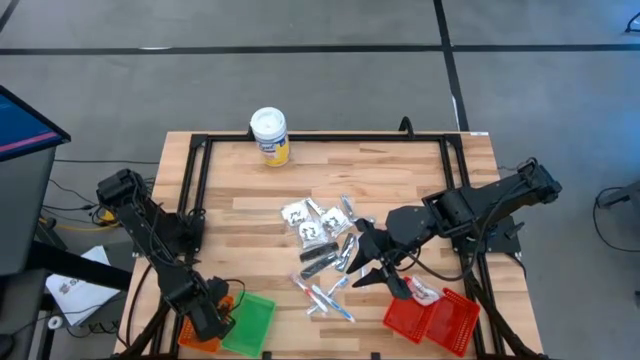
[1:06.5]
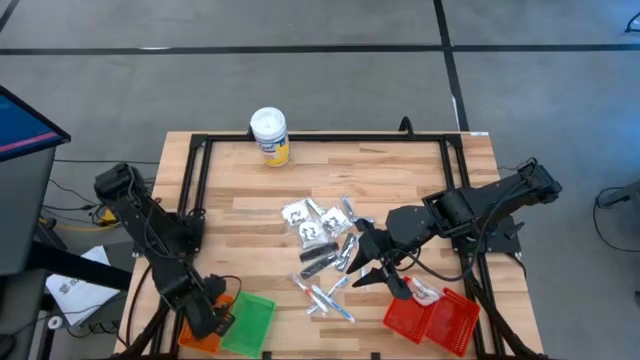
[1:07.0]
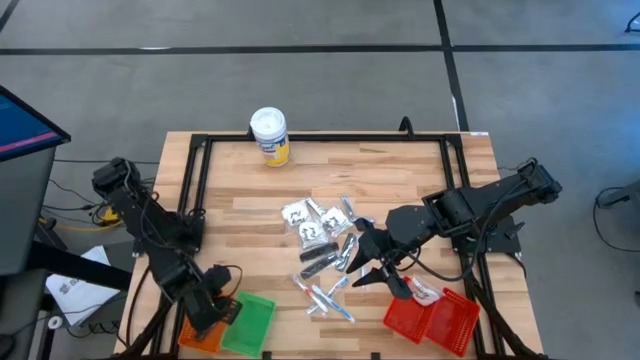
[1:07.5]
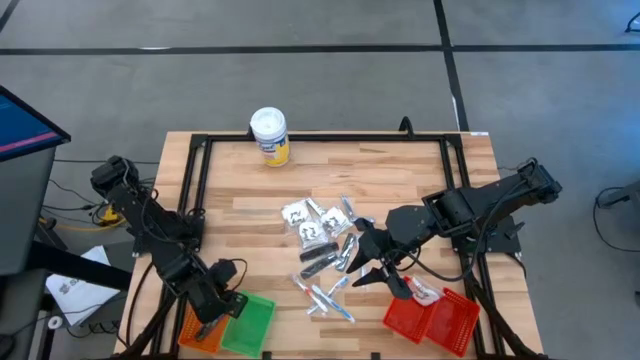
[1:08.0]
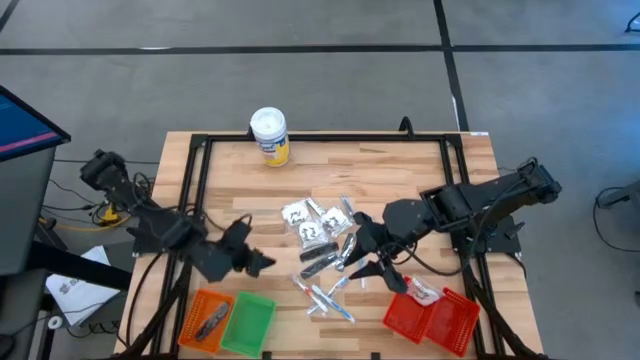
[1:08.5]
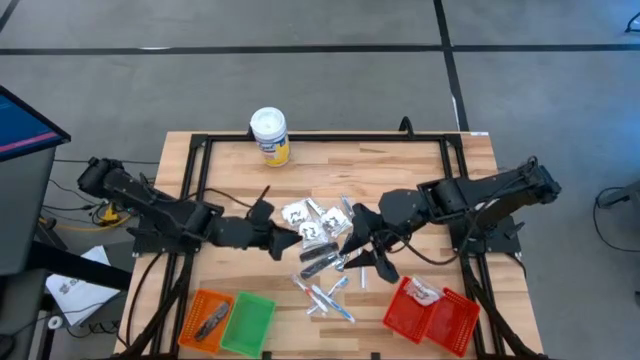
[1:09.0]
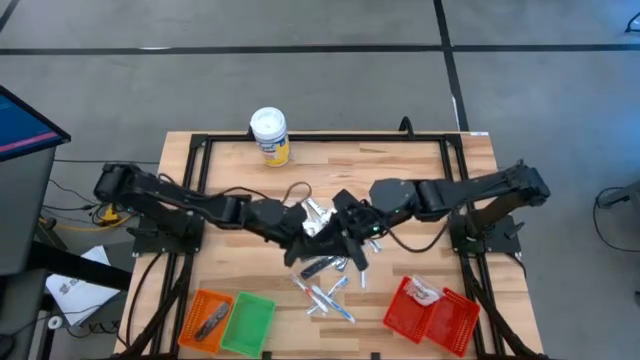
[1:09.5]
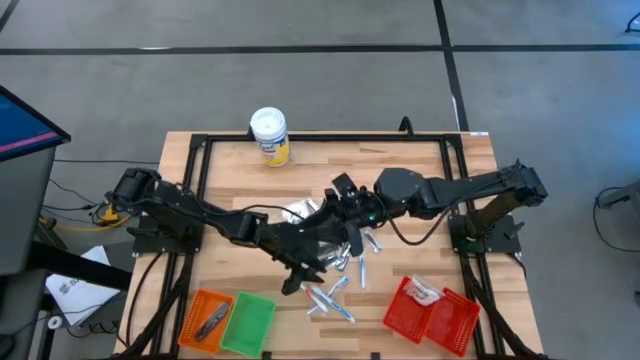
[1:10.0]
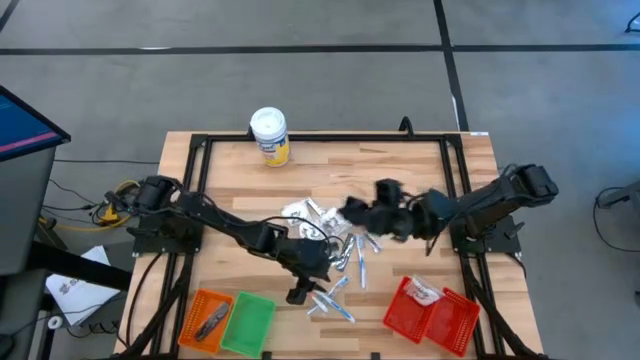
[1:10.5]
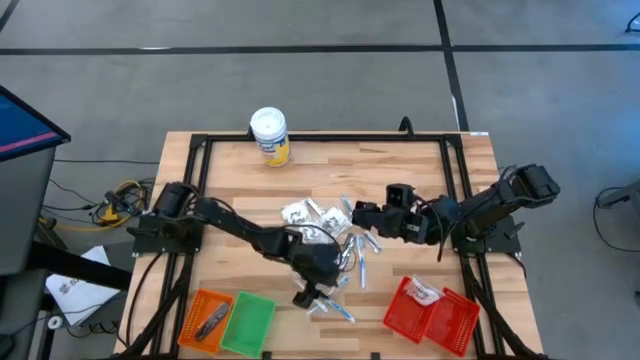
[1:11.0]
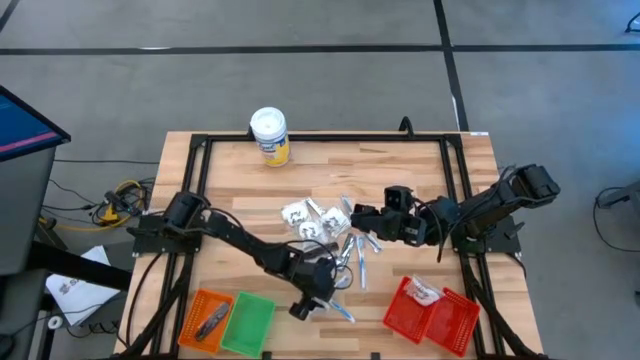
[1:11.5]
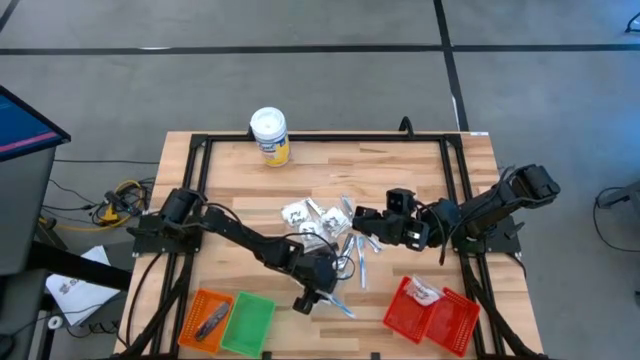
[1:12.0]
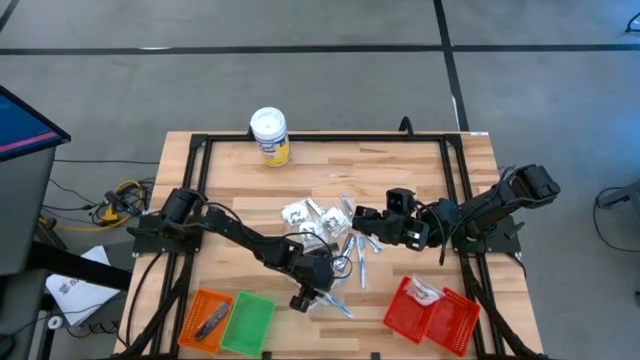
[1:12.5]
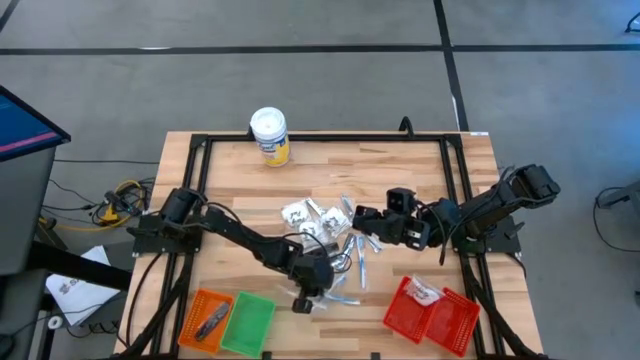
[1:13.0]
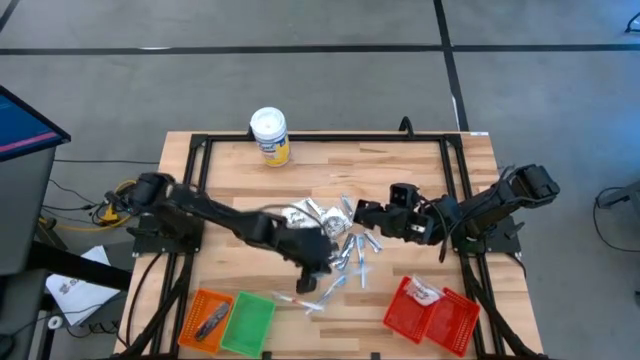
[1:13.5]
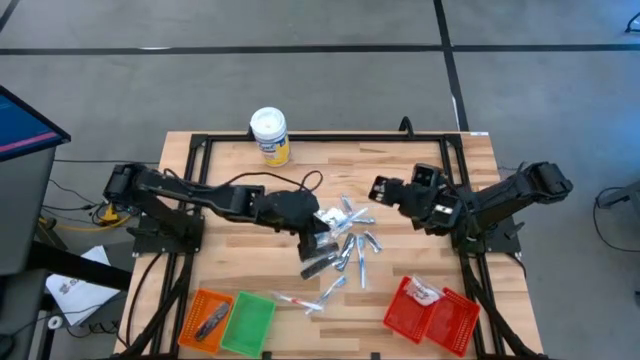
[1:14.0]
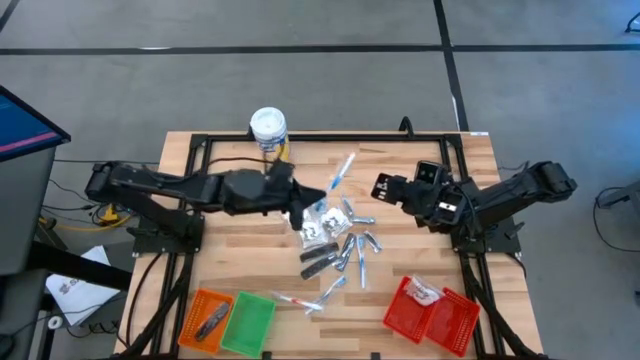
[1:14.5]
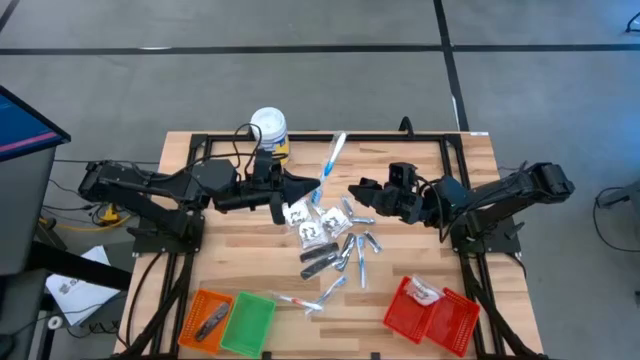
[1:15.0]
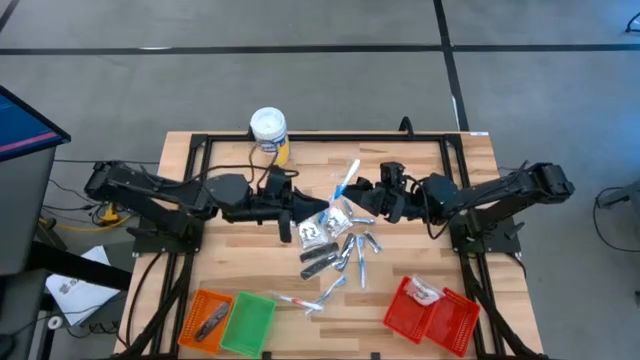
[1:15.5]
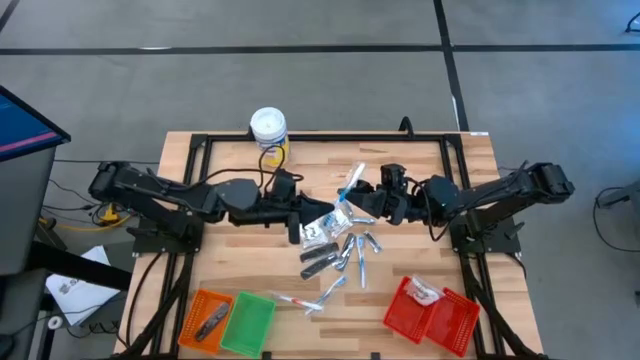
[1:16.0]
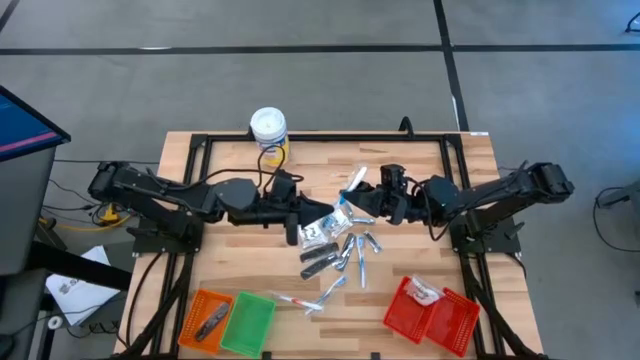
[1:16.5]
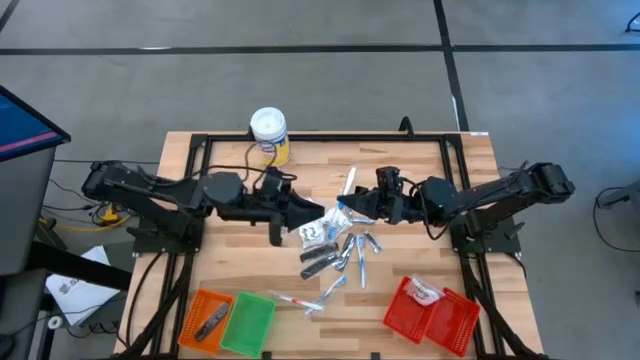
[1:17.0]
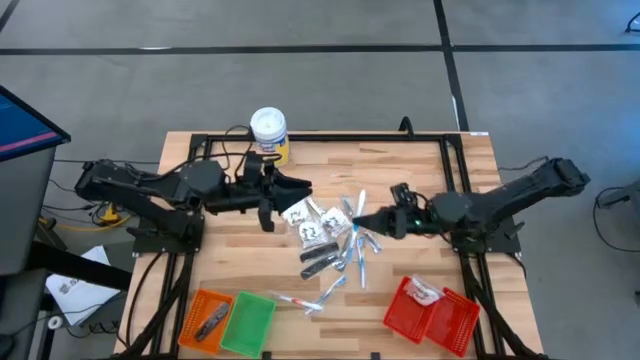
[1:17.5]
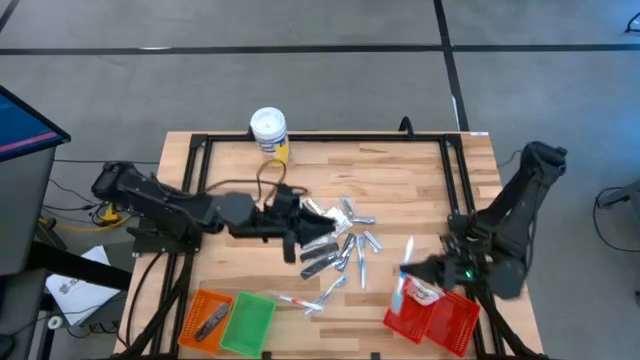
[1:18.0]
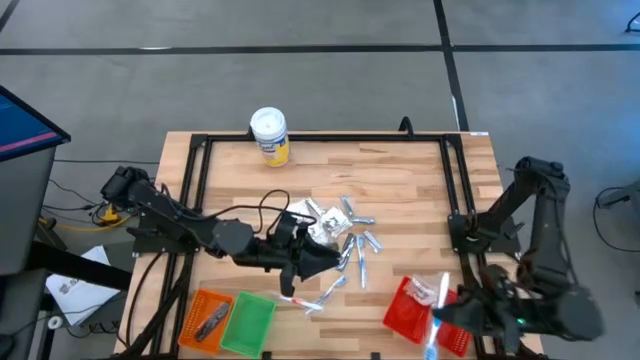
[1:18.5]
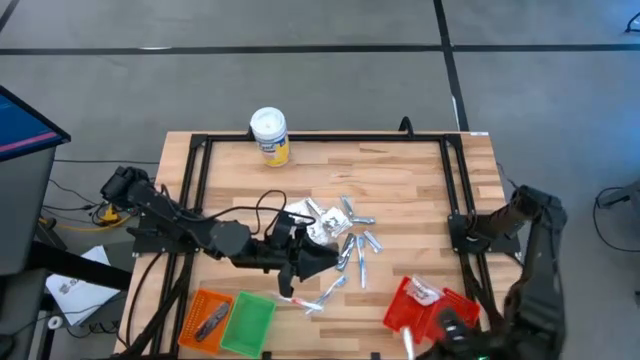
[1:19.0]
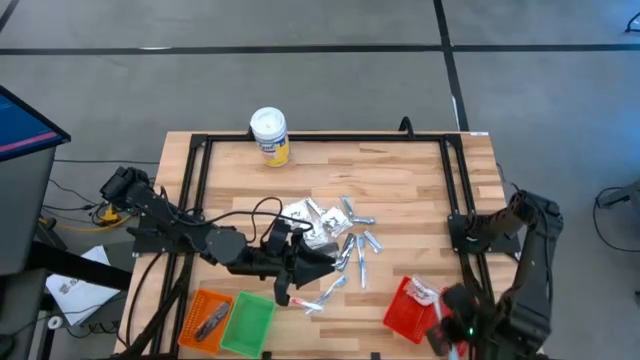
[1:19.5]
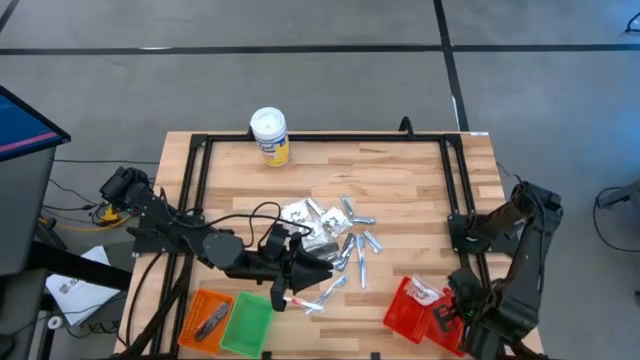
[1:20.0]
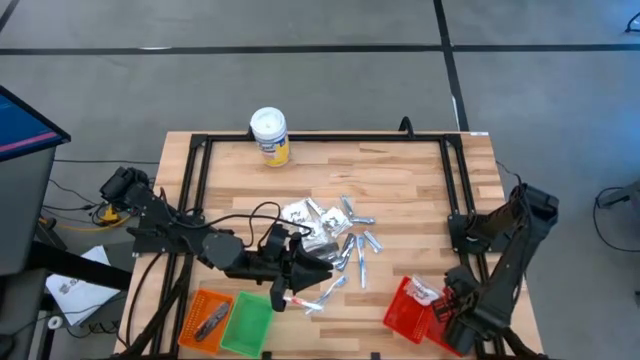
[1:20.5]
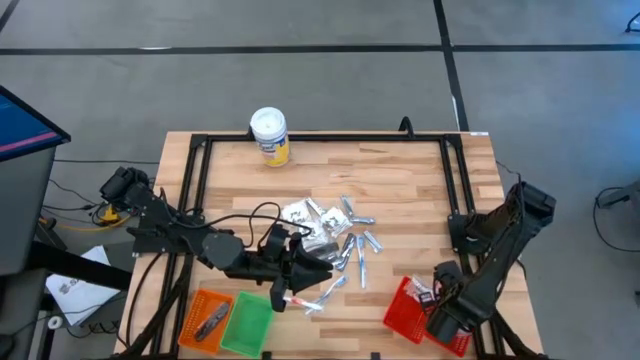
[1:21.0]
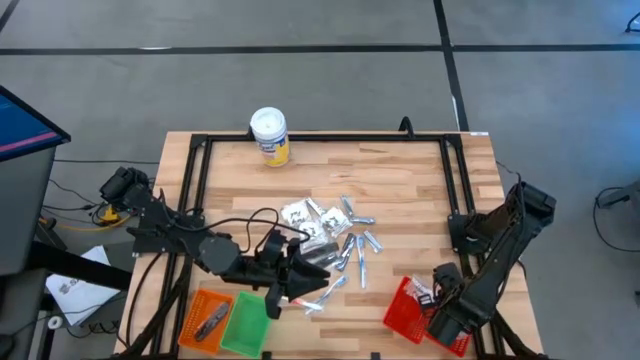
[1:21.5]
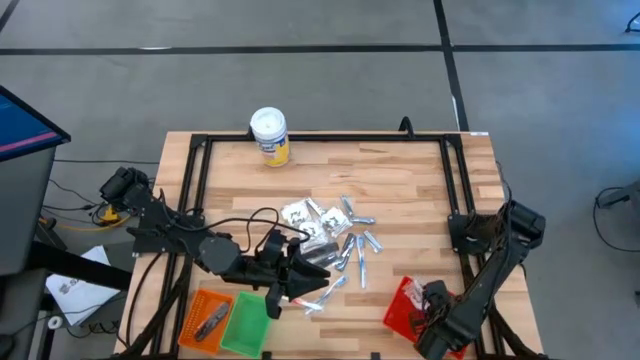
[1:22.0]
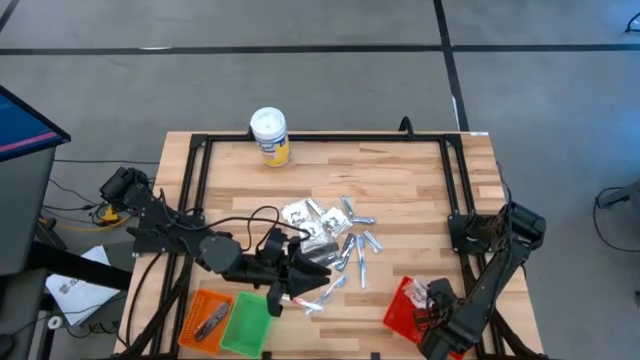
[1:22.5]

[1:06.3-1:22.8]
Task: Pick & Place Travel size toiletries
Put the blue toothbrush into the right red basket

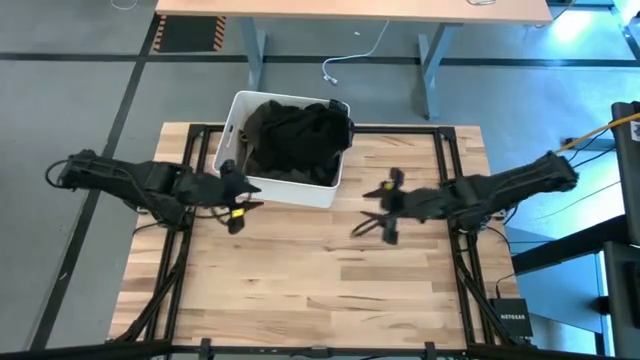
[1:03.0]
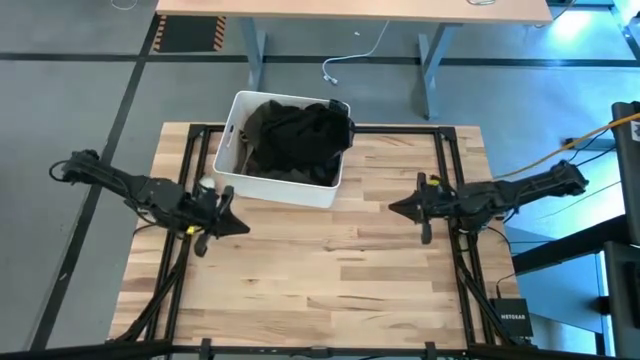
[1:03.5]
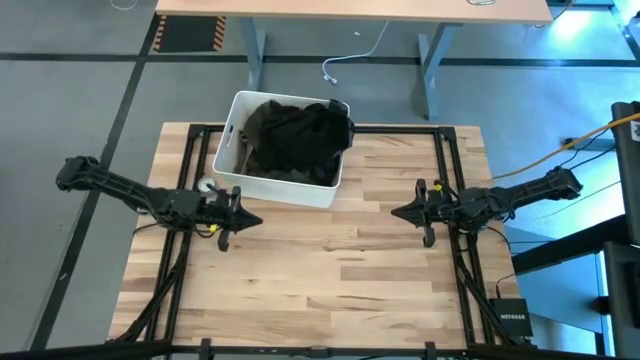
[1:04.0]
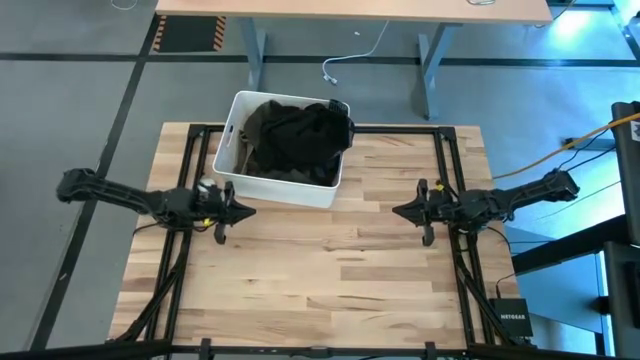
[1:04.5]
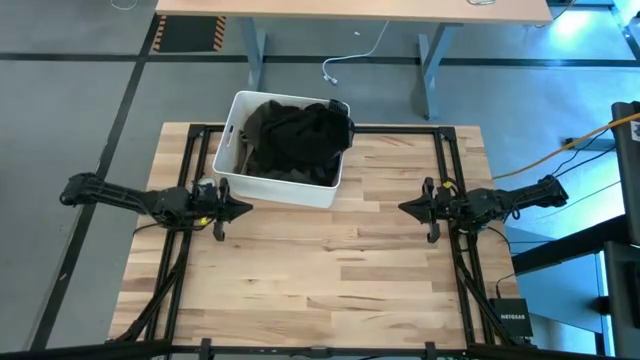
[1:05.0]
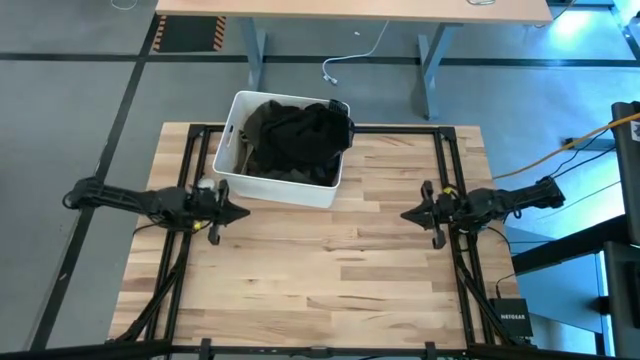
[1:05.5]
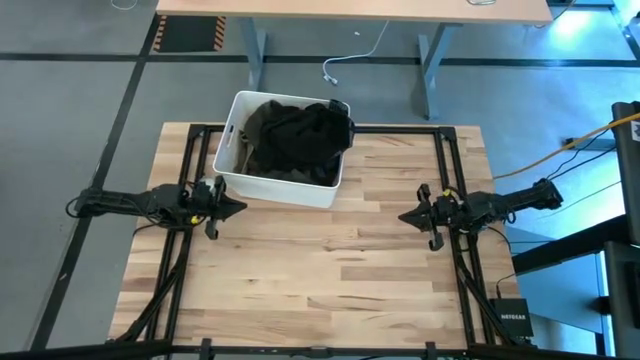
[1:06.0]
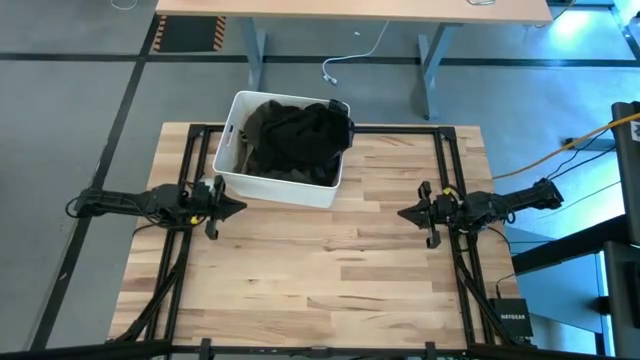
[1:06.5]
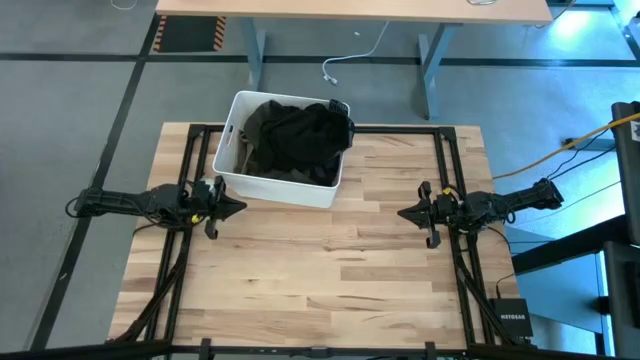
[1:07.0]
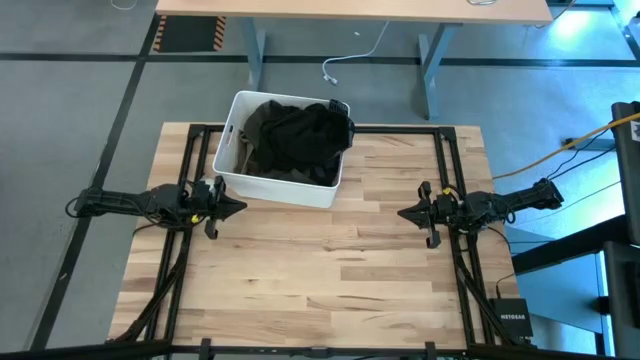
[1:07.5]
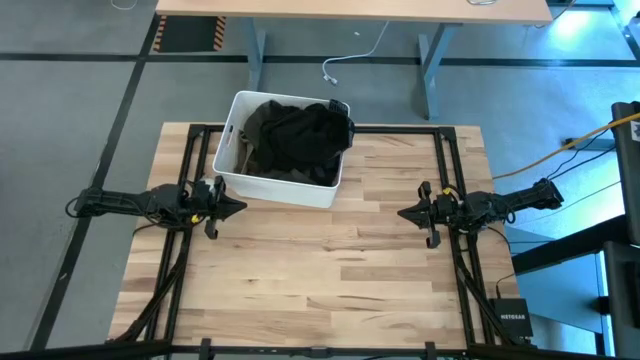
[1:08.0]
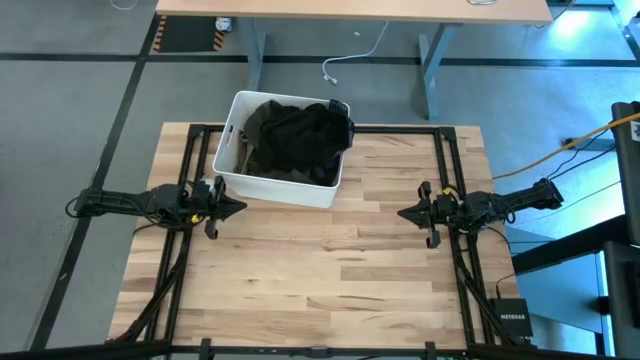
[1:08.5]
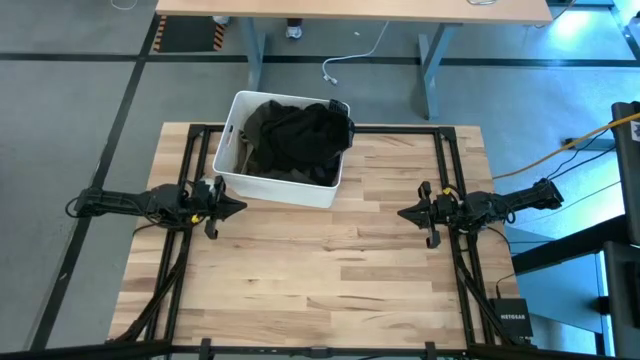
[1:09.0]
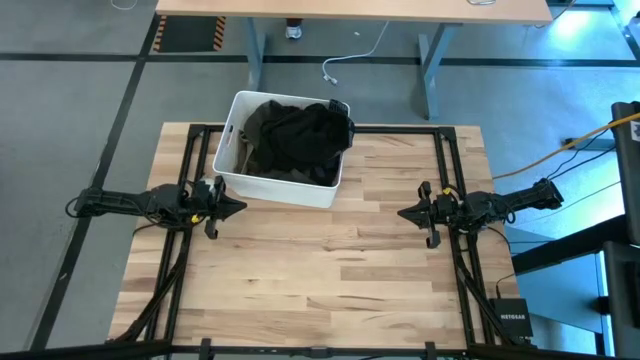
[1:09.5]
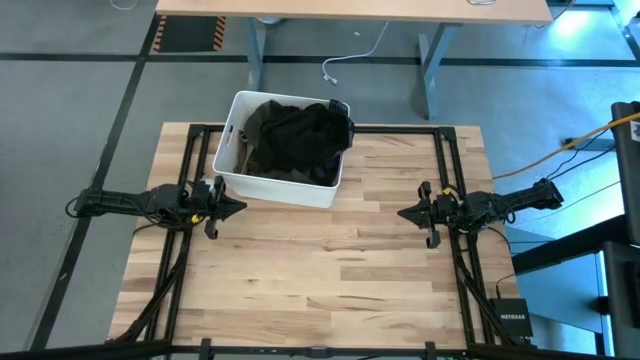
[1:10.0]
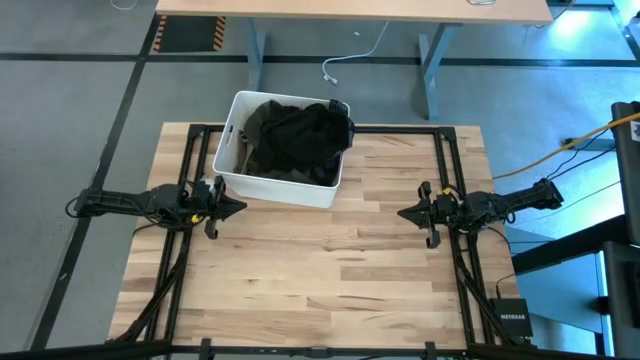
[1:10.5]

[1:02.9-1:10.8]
Task: Sort clothes
Return to Home Position
